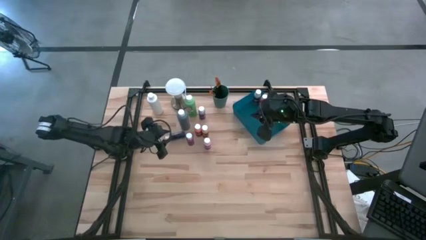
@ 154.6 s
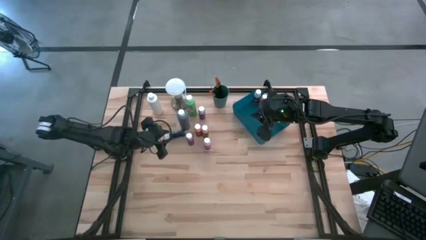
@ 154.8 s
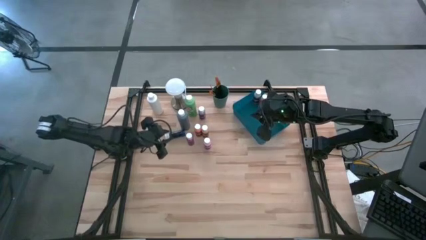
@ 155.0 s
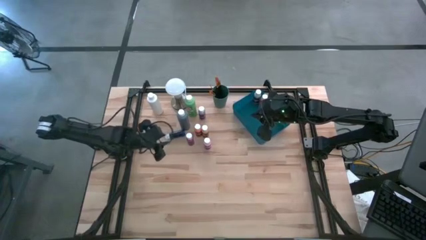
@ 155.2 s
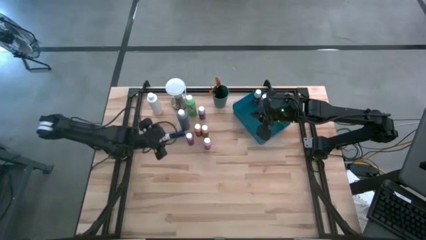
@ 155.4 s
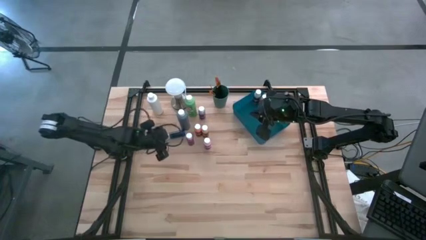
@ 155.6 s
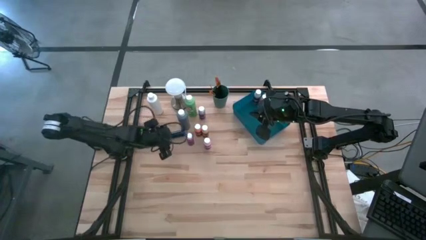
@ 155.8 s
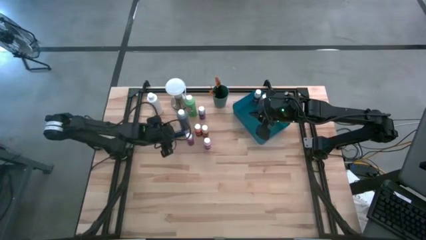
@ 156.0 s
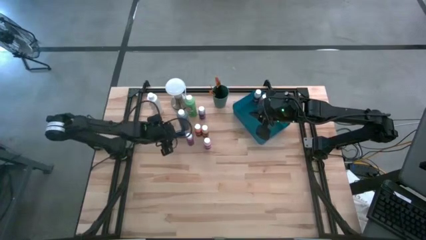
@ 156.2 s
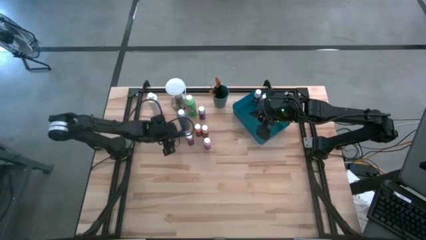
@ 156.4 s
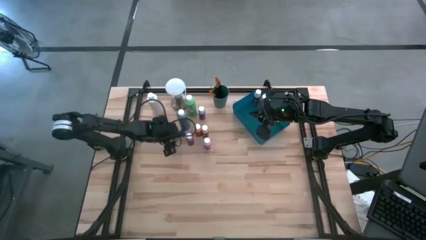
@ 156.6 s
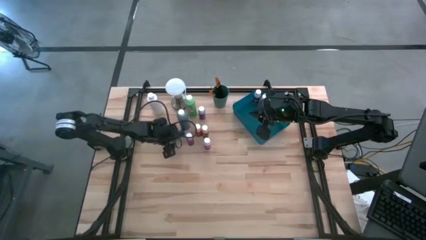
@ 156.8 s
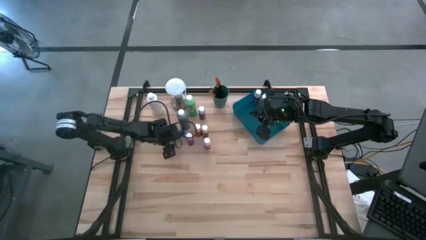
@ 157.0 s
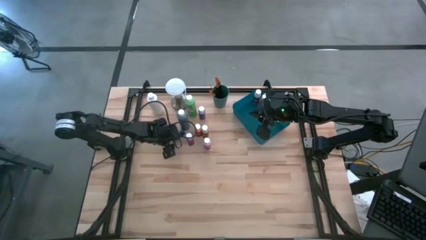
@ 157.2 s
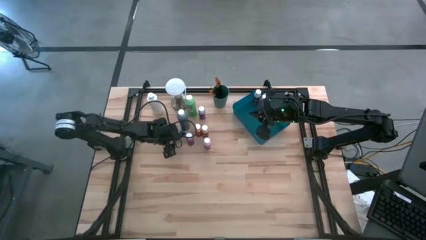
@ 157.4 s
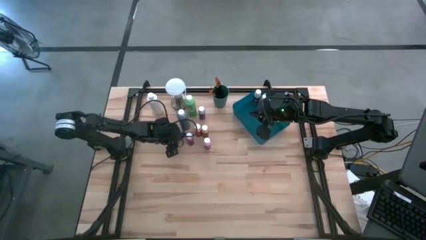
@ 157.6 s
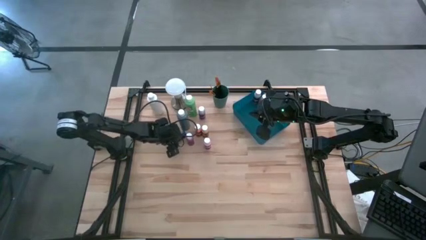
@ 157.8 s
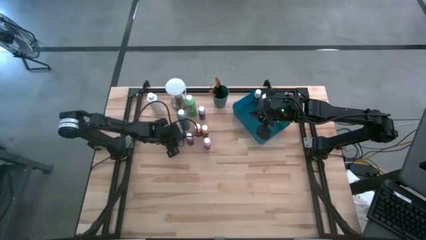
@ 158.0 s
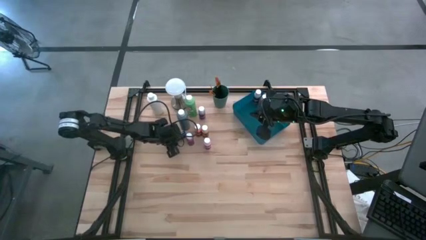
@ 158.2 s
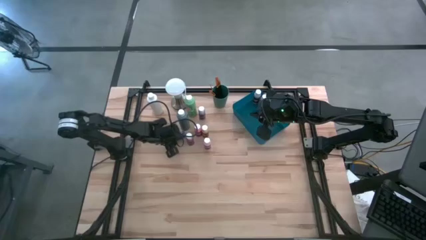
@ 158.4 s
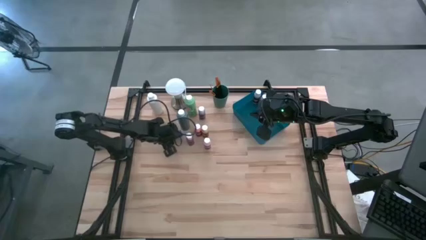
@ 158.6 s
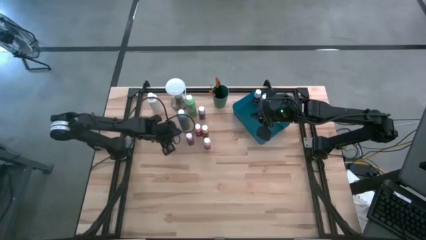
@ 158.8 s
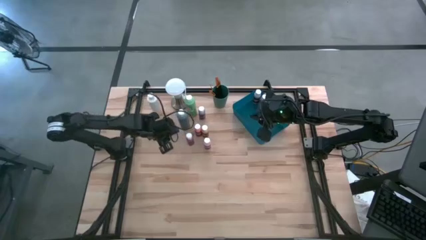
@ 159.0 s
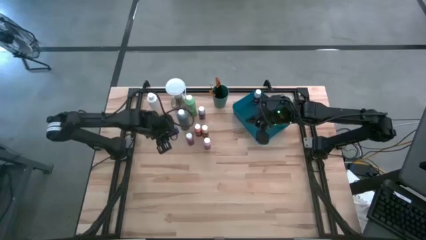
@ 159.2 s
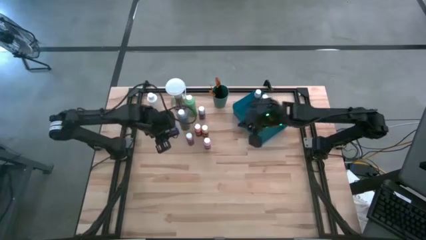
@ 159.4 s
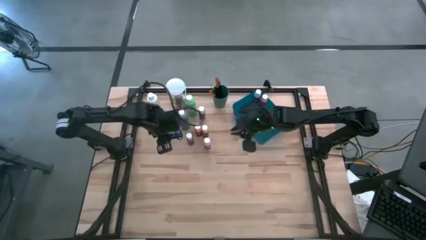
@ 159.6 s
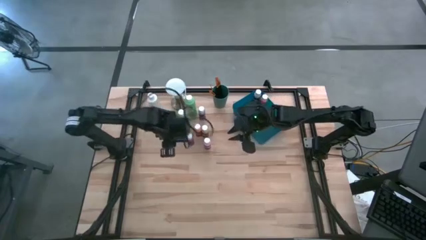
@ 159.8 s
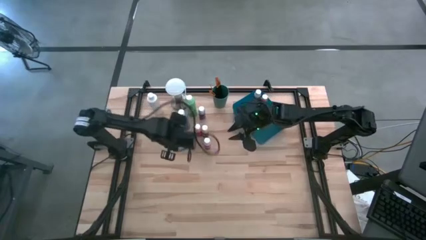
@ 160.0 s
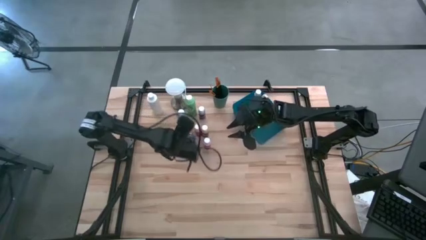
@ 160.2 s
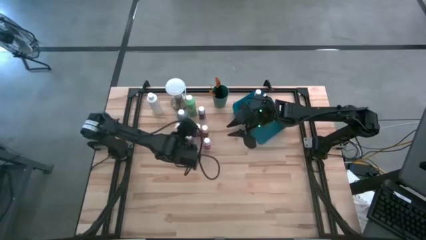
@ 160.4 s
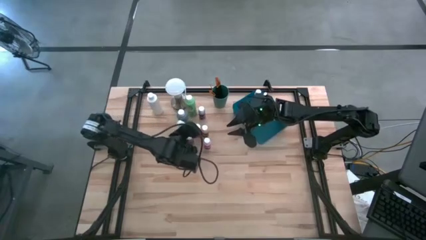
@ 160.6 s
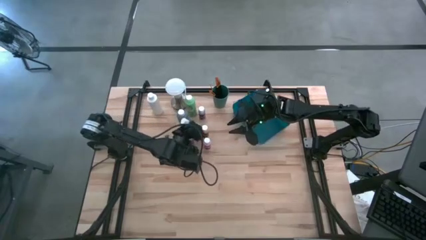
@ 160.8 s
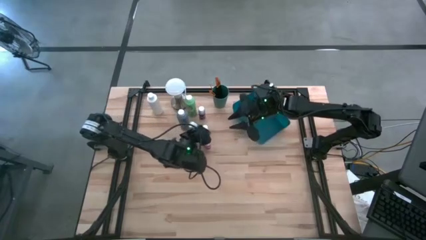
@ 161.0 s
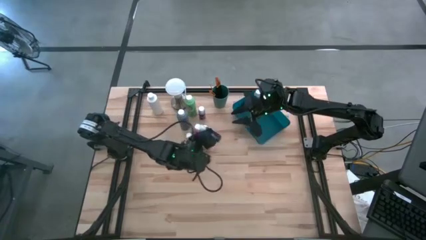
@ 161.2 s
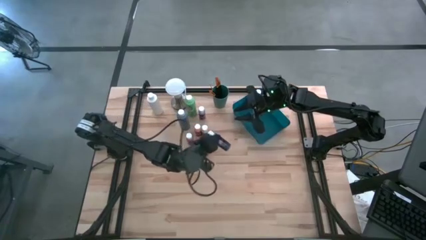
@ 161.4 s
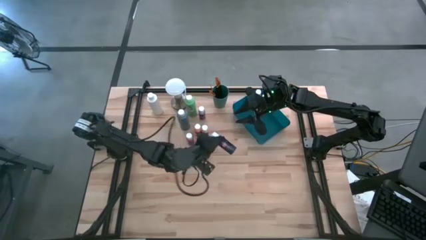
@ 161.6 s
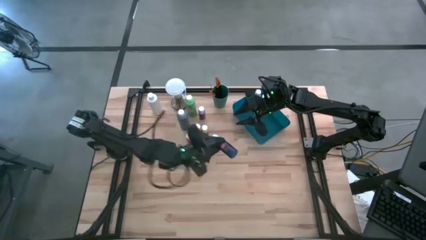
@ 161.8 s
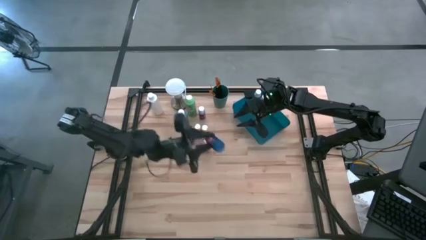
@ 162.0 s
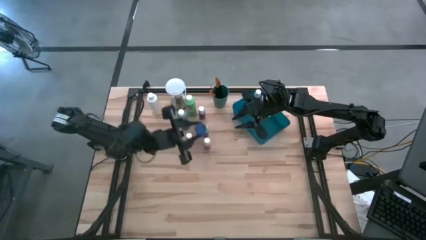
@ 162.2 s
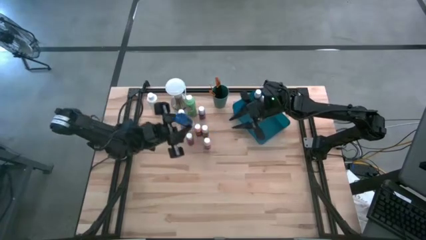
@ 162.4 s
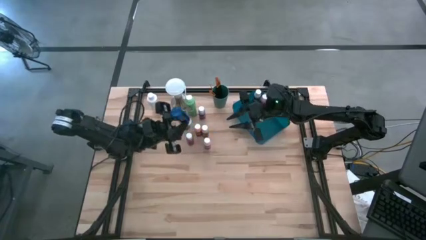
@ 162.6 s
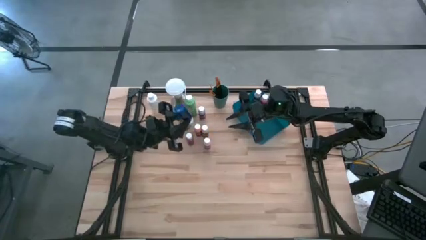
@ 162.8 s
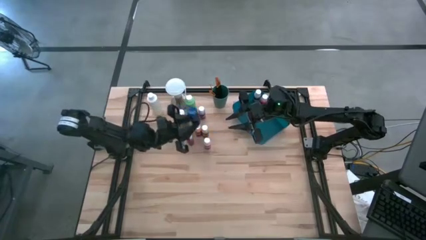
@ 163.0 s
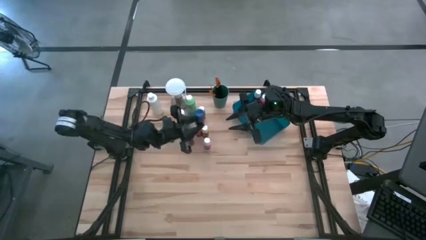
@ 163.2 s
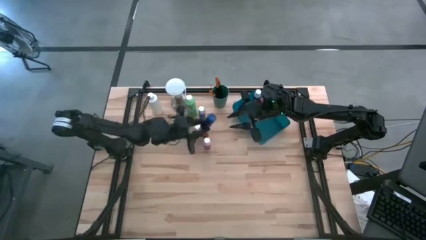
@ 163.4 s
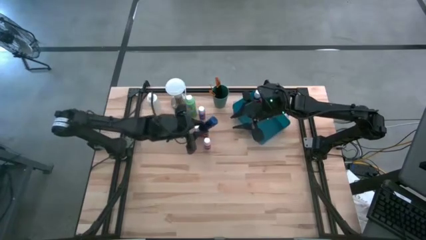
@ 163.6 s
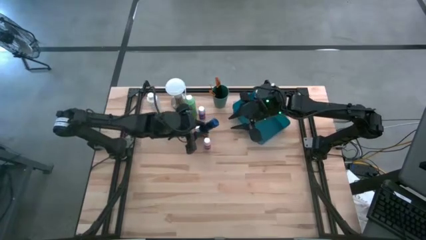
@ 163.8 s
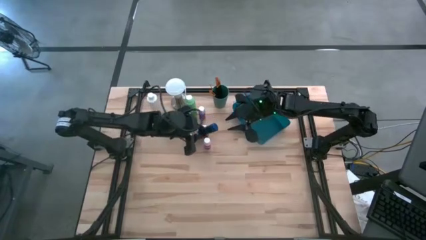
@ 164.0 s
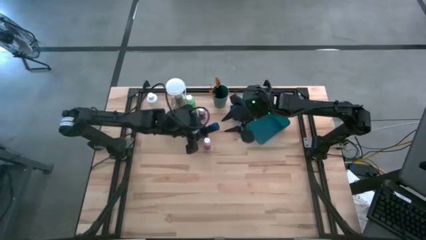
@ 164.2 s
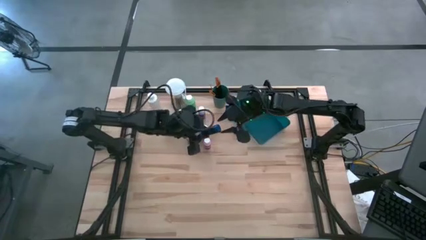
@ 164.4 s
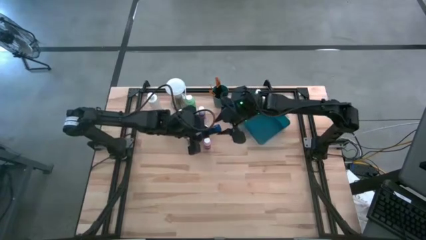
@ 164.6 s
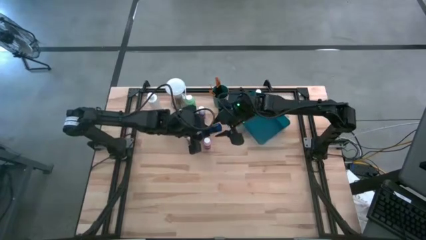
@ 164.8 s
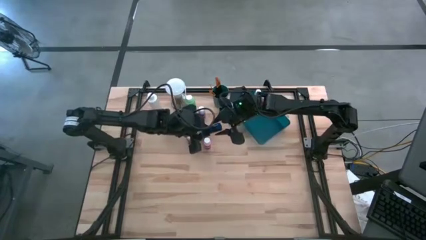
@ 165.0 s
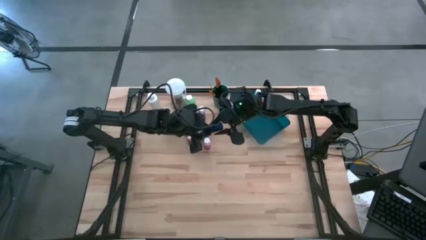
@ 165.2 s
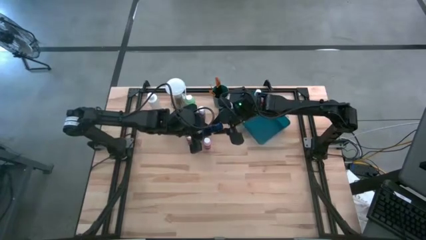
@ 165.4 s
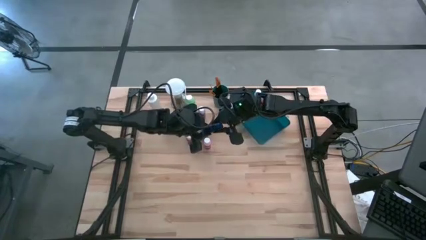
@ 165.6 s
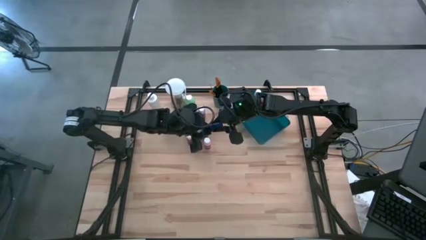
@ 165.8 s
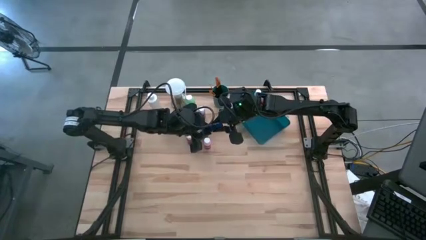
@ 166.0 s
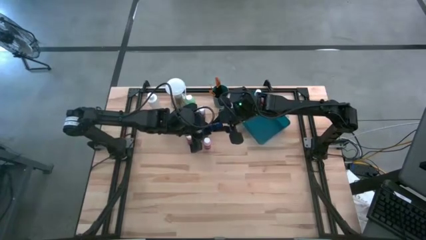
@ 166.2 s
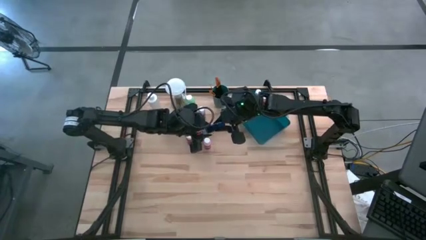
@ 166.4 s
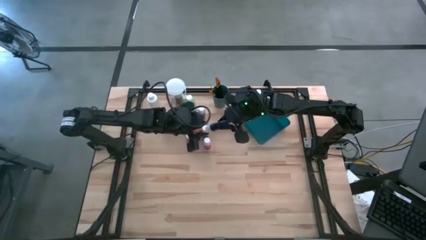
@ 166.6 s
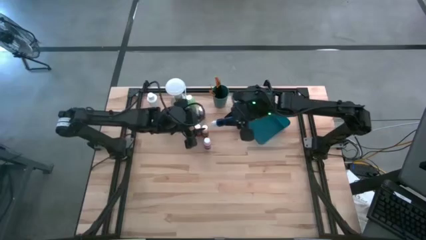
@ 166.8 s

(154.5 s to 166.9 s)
Task: Pick & Place Paint Supplies
Put the small blue paint bottle into the blue bin
